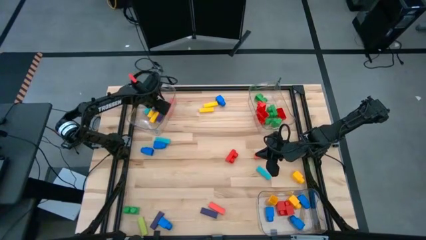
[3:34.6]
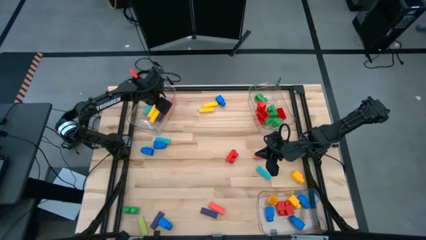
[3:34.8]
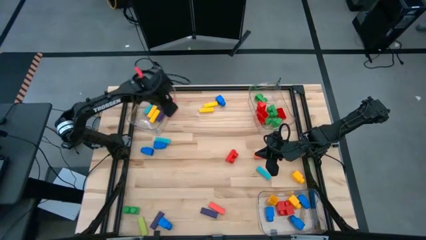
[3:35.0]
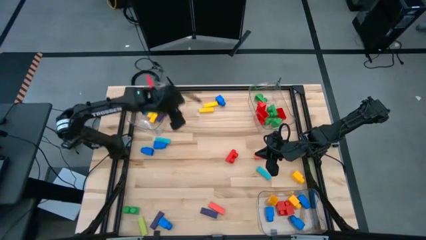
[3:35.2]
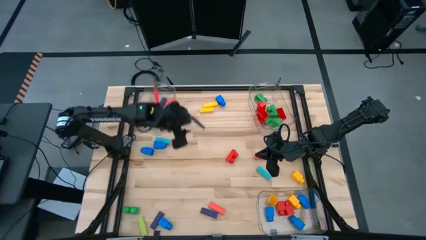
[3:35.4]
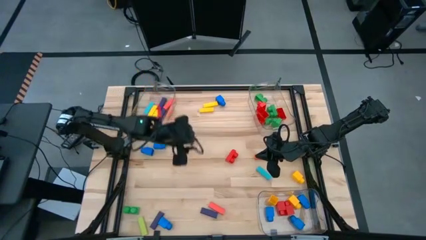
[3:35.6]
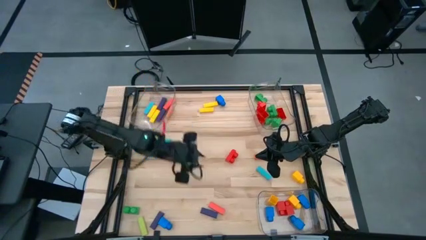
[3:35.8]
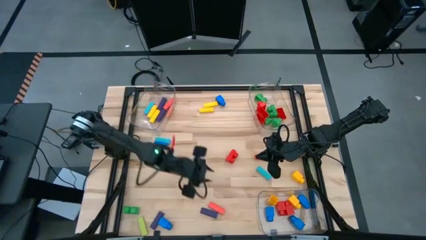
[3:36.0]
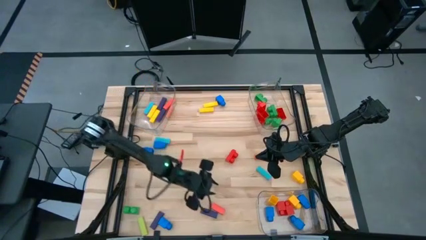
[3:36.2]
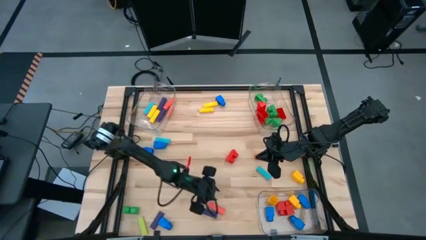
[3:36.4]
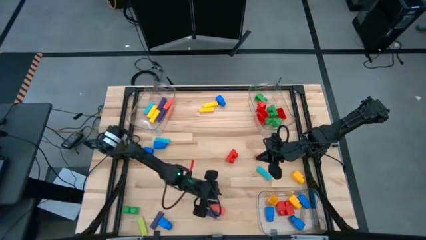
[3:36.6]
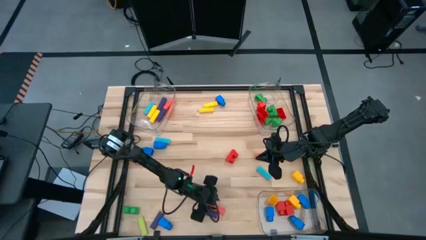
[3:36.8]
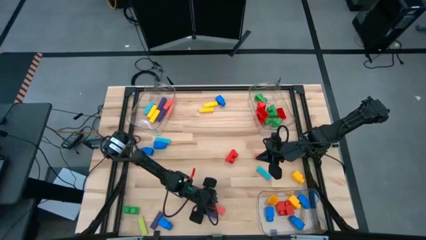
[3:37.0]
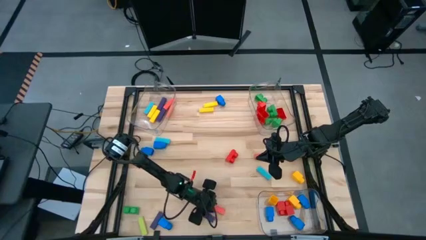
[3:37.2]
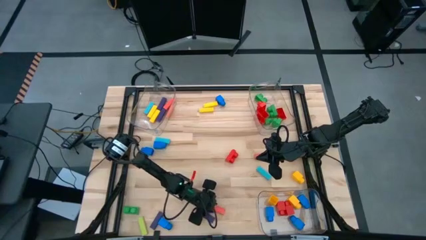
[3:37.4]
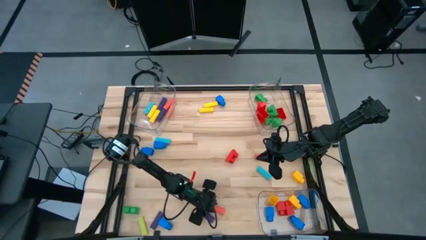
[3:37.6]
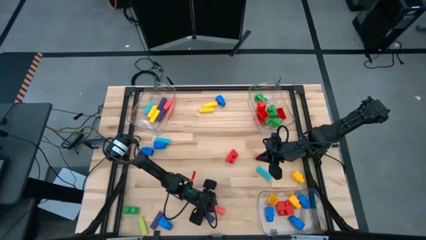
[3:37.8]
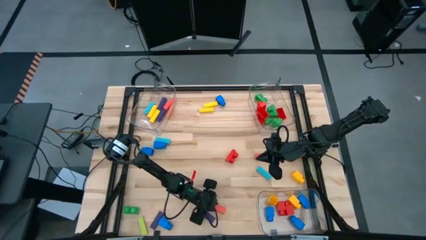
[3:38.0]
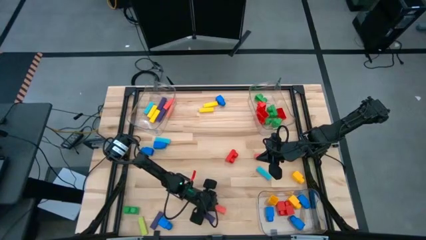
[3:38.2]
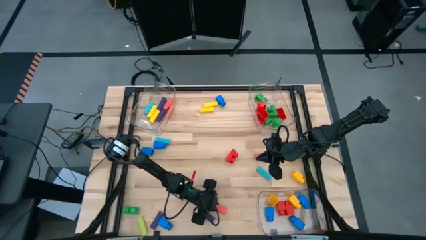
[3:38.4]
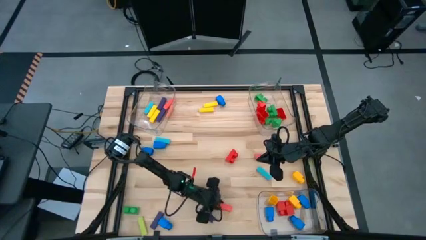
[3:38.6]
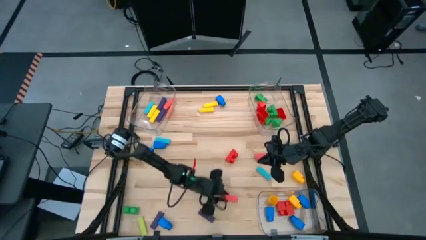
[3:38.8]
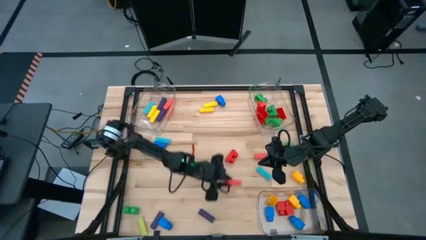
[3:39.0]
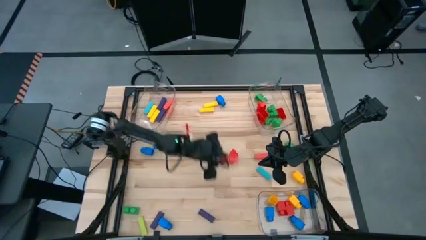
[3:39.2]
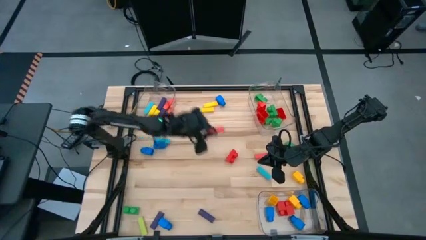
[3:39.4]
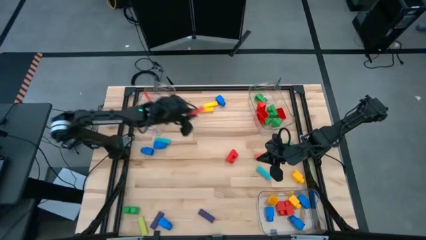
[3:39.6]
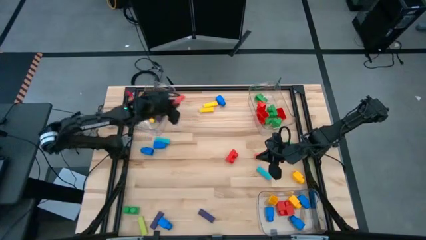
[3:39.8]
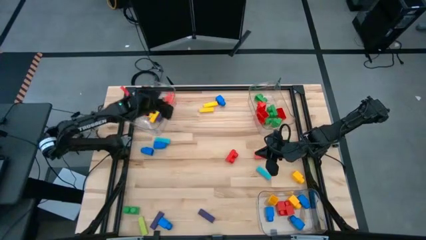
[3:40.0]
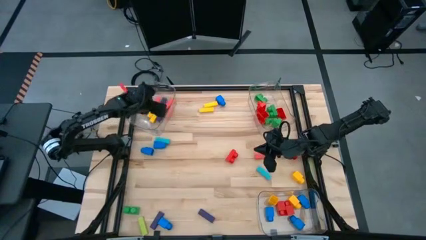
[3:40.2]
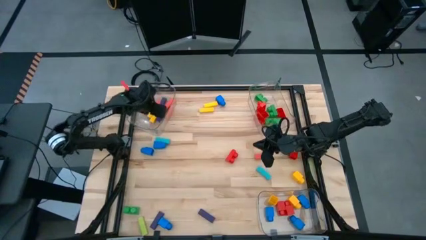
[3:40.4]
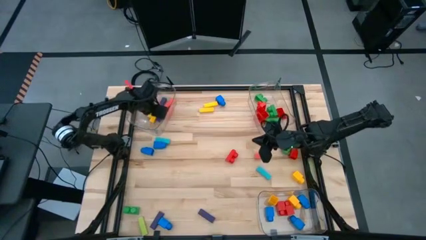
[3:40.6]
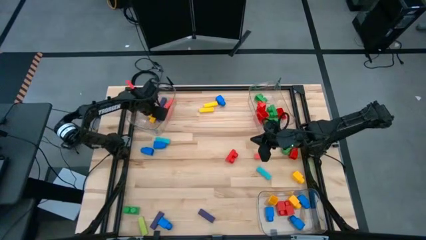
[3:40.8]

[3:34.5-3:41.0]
Task: Sort blocks by size
Put the orange block into the top left transparent bin

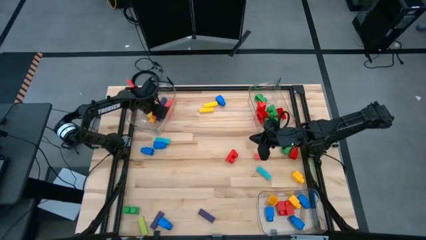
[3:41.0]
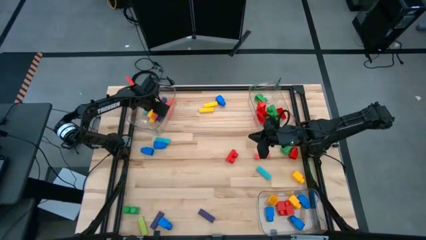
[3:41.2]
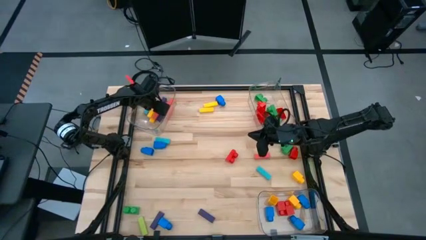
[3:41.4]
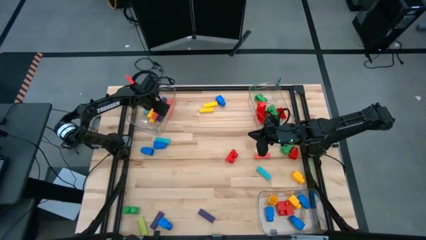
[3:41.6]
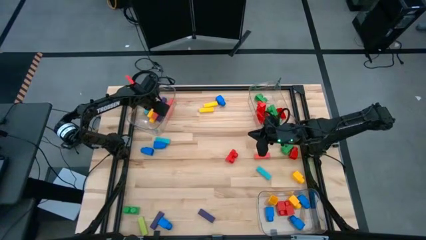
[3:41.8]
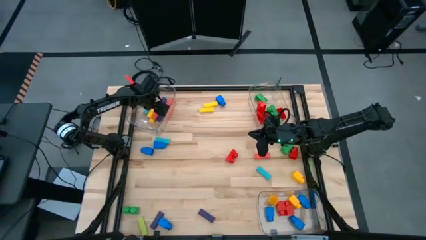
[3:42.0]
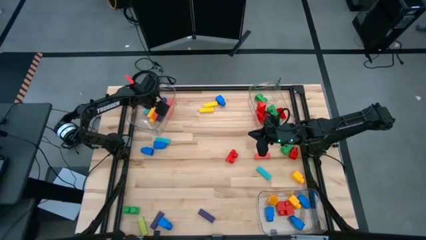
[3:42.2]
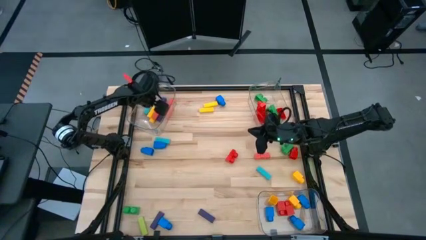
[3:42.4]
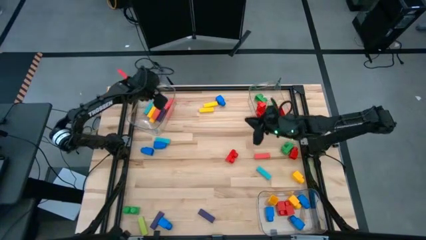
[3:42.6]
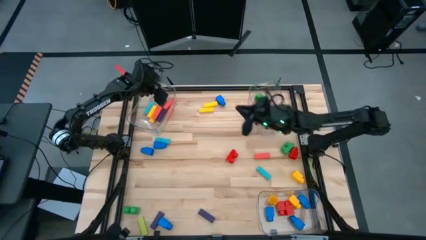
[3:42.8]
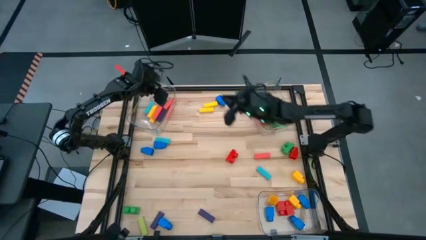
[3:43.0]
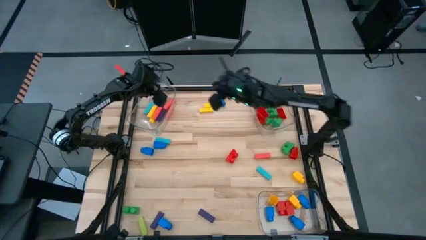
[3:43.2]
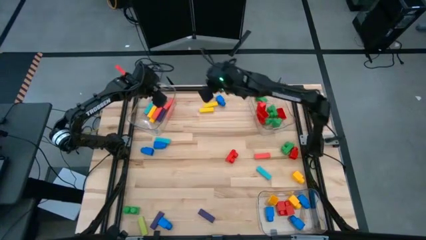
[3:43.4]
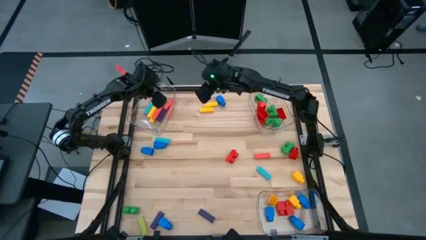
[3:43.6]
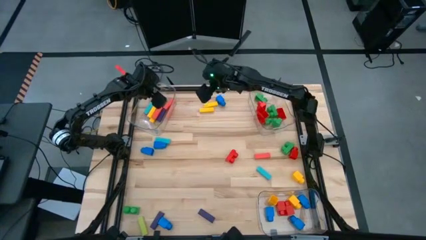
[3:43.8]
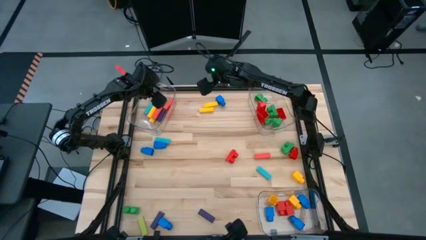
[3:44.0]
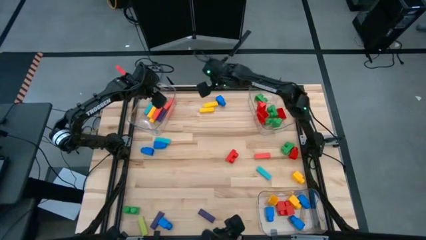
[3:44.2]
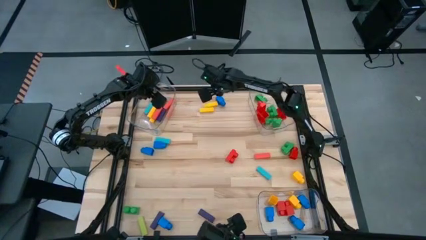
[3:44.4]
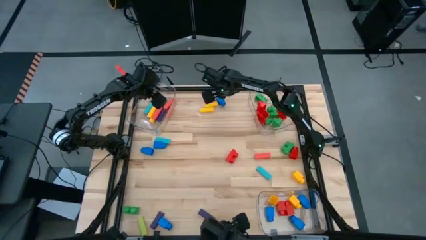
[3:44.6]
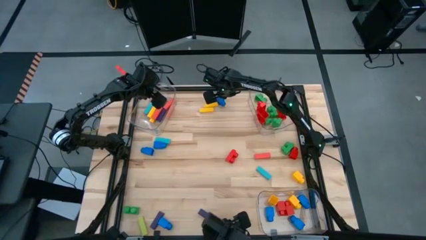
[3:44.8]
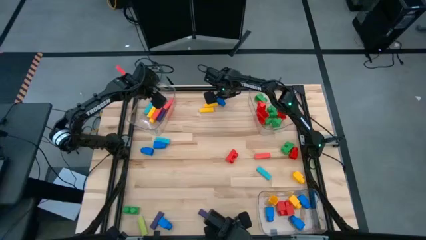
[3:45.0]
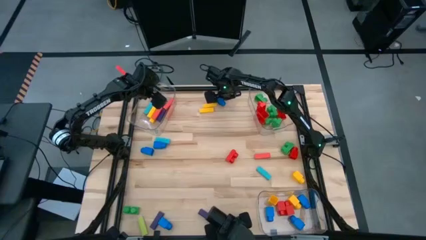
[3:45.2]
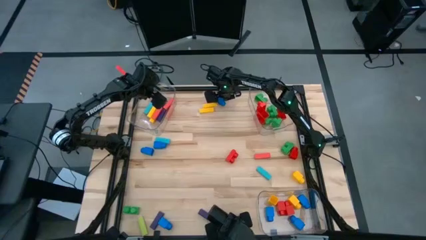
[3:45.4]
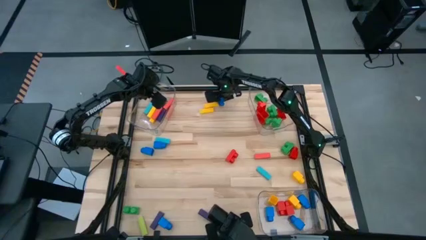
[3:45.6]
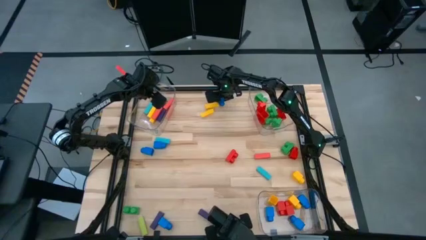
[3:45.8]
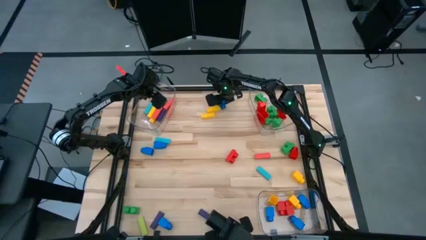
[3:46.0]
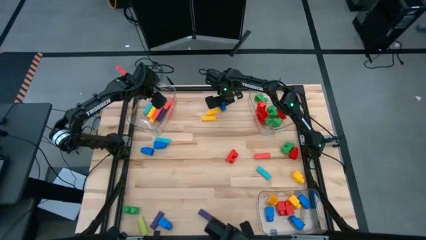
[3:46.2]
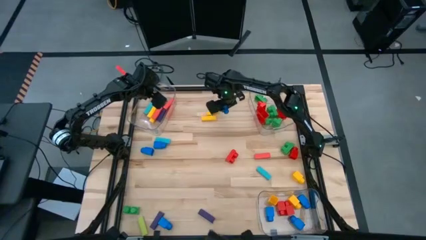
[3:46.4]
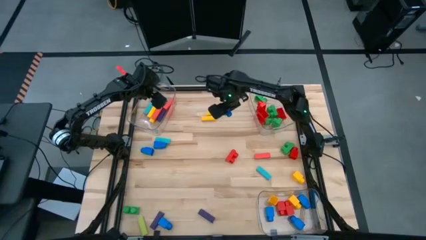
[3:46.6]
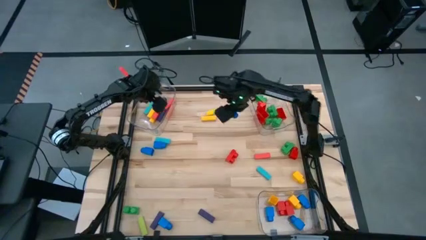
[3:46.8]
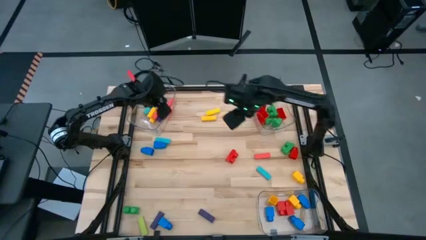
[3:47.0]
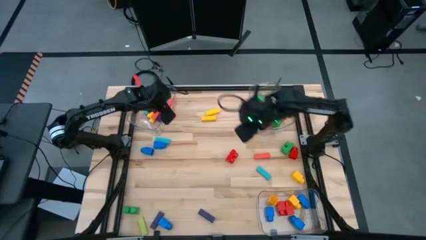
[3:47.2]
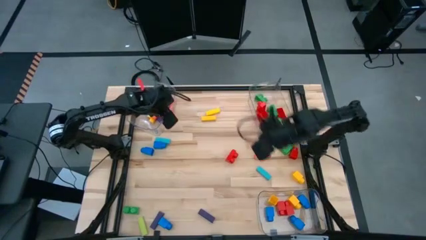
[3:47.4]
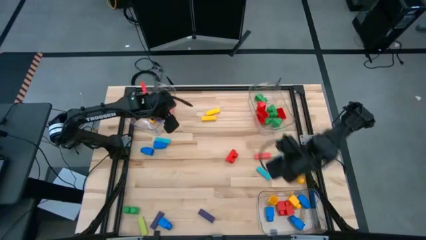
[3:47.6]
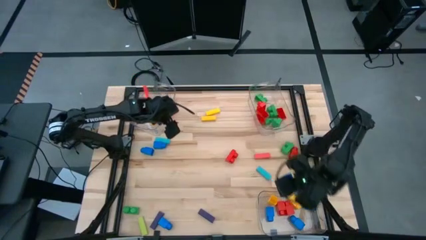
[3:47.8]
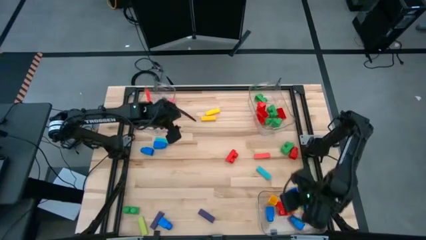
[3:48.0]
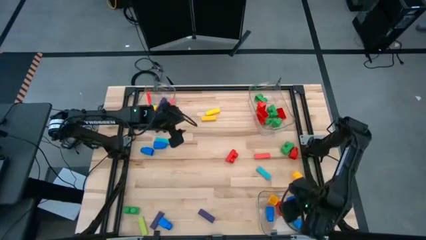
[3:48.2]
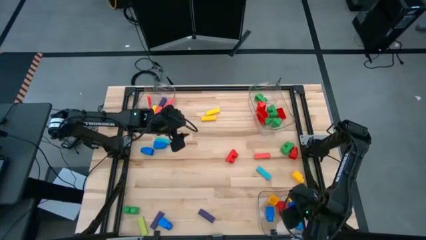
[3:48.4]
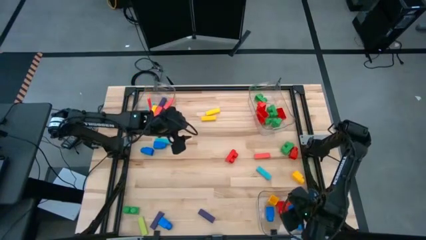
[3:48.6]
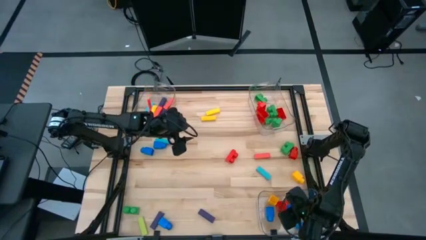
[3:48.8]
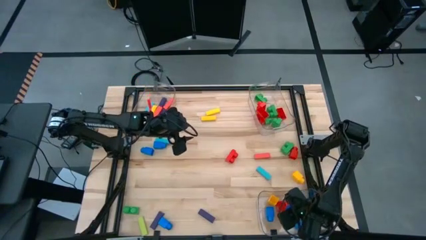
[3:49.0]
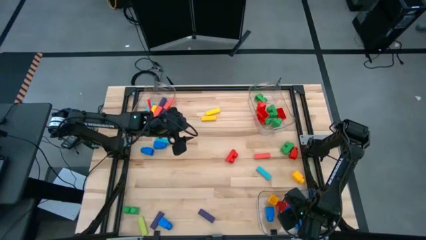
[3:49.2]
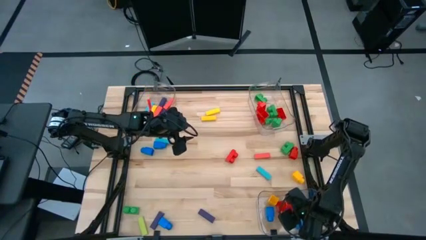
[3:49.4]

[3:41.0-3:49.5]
Put the blue 1 stud game piece into the bottom transparent bin
